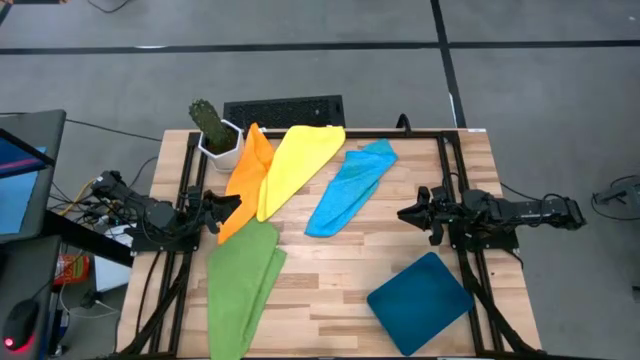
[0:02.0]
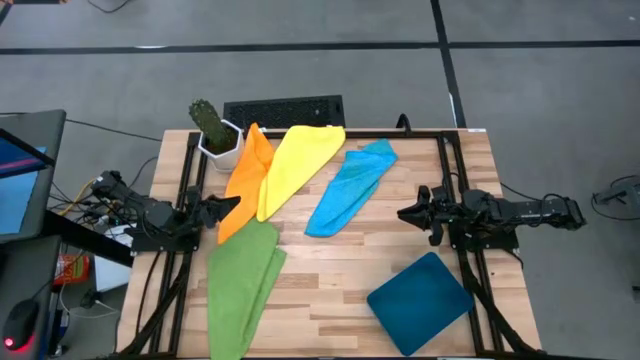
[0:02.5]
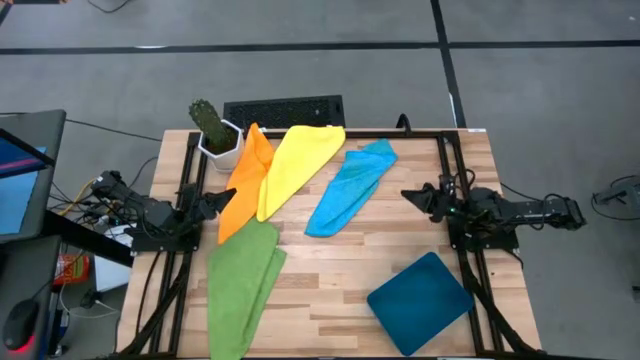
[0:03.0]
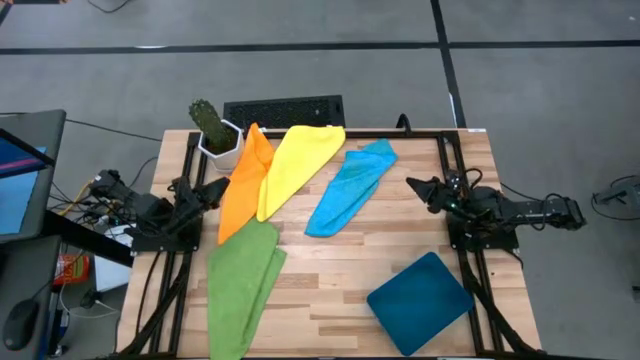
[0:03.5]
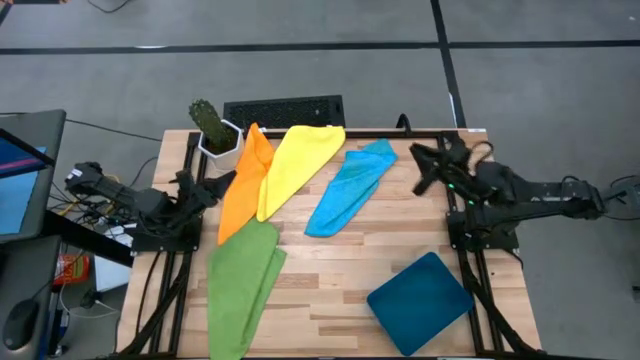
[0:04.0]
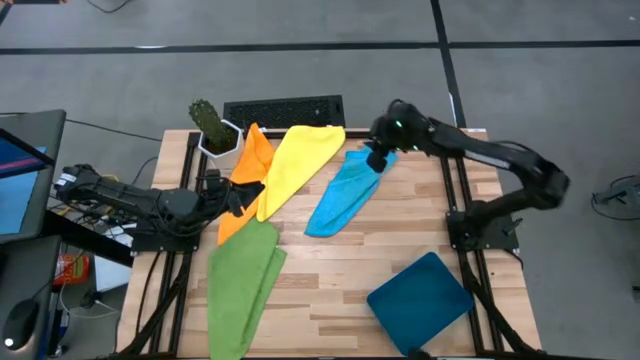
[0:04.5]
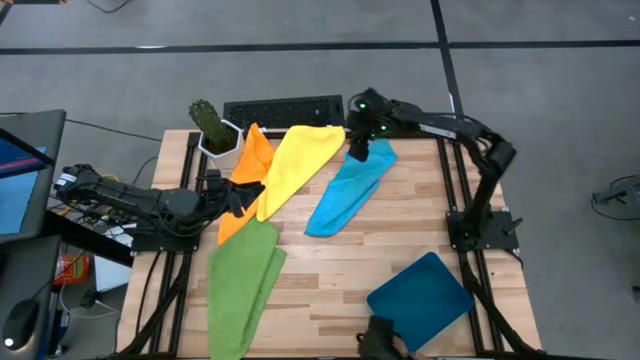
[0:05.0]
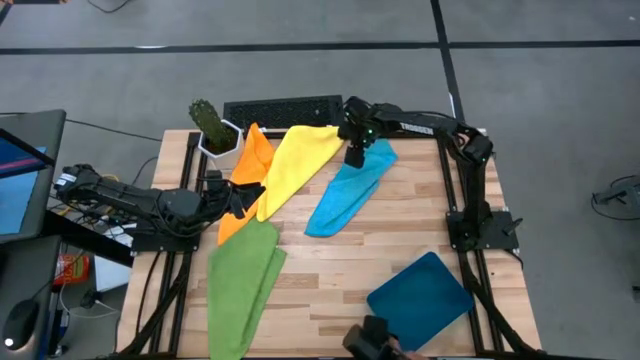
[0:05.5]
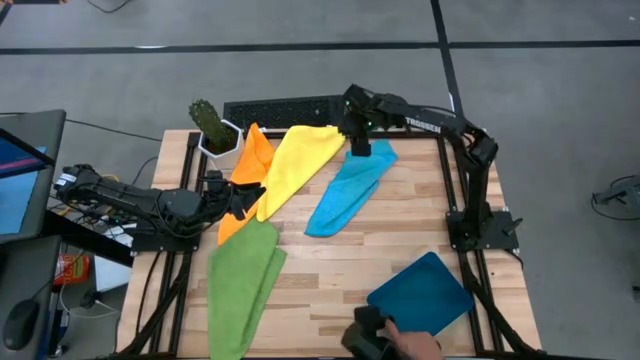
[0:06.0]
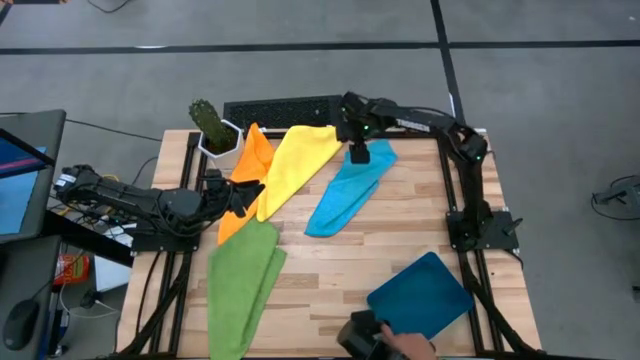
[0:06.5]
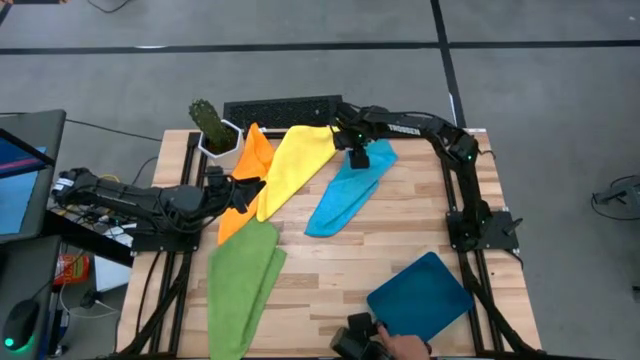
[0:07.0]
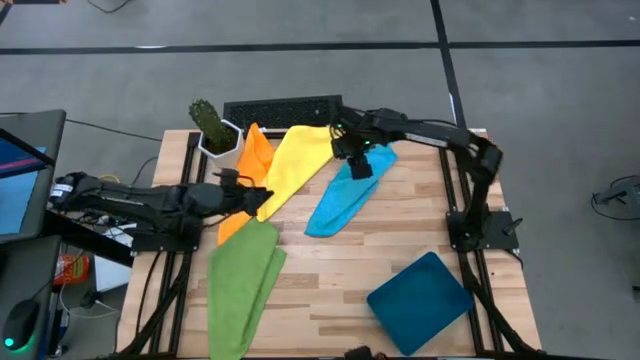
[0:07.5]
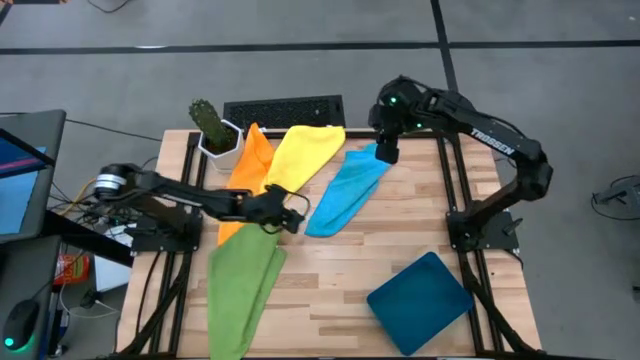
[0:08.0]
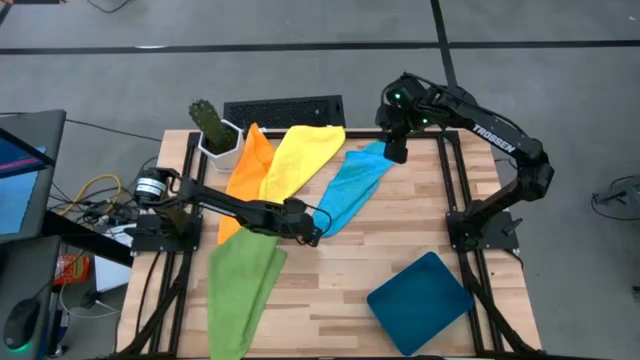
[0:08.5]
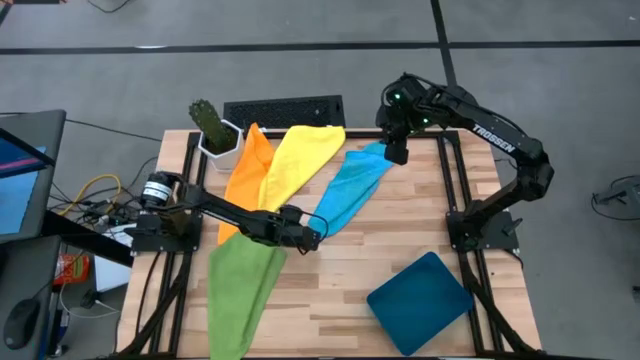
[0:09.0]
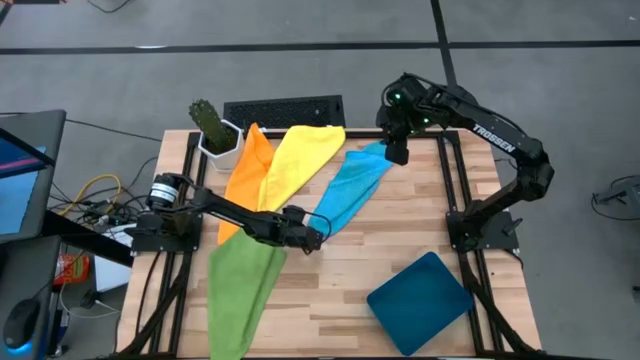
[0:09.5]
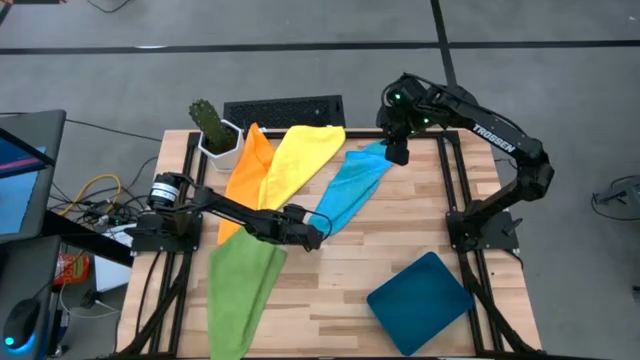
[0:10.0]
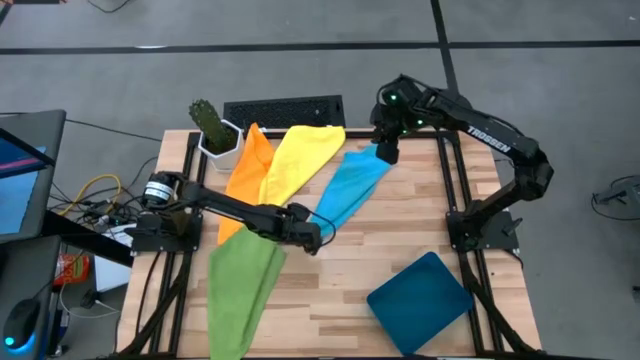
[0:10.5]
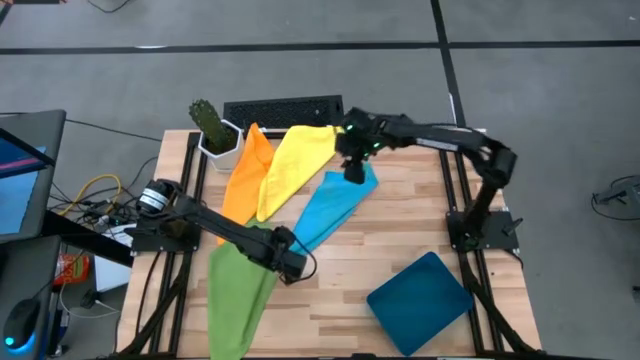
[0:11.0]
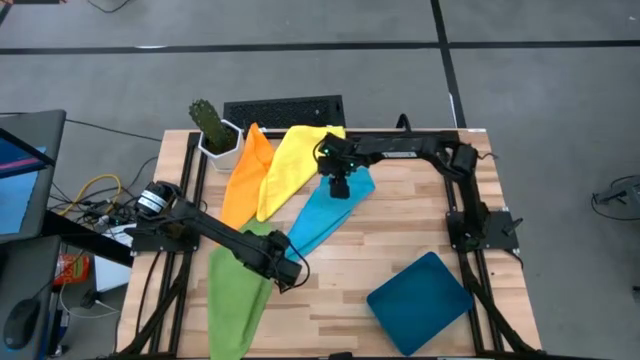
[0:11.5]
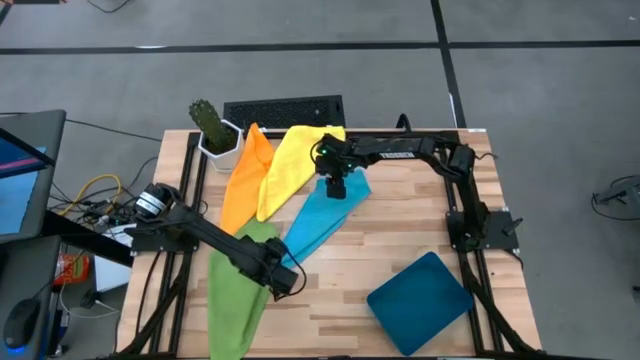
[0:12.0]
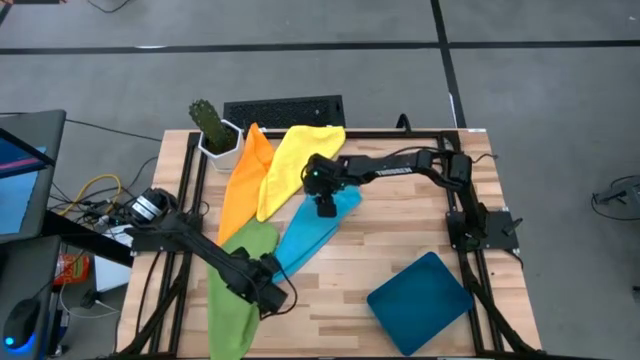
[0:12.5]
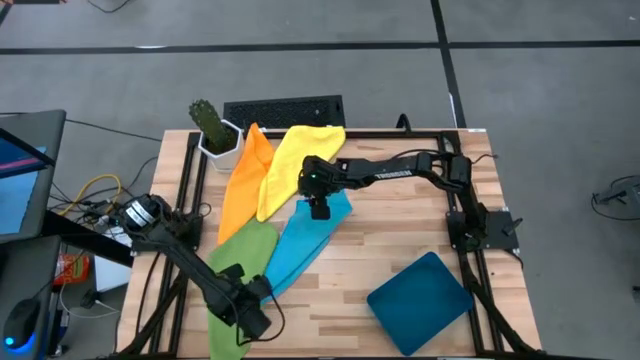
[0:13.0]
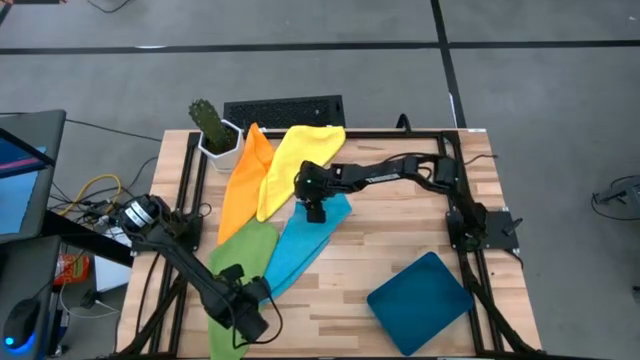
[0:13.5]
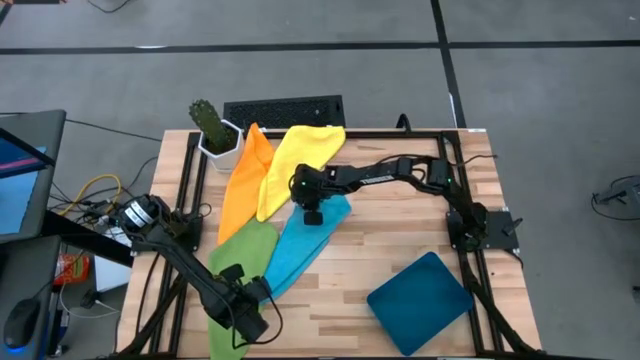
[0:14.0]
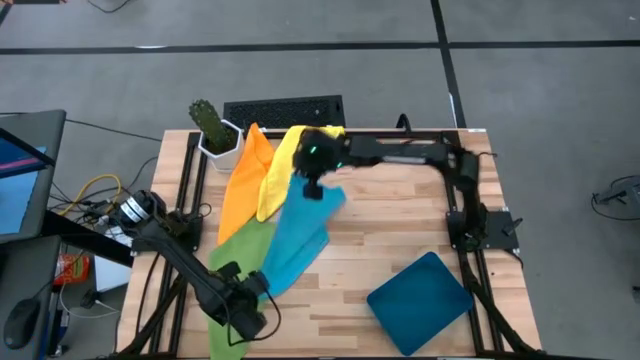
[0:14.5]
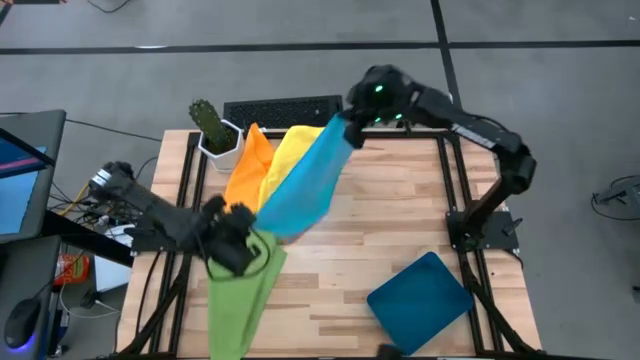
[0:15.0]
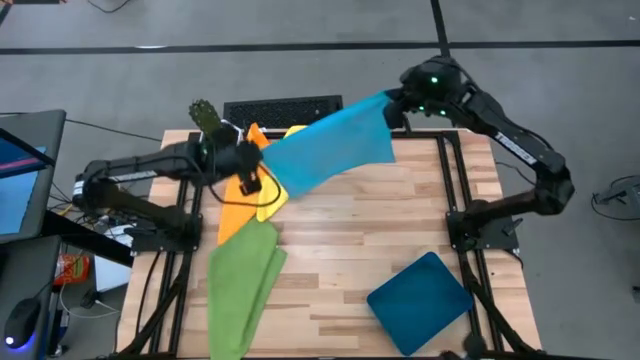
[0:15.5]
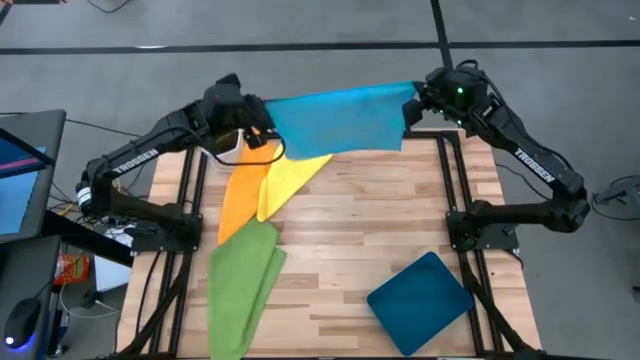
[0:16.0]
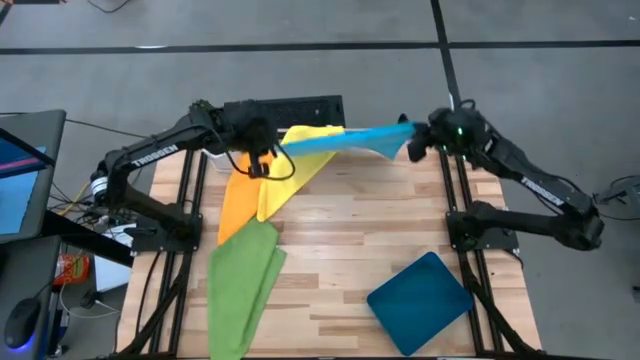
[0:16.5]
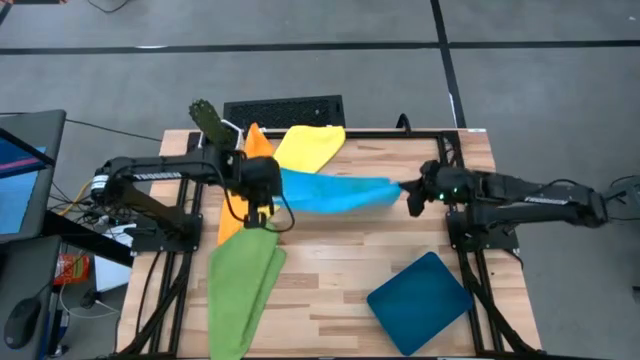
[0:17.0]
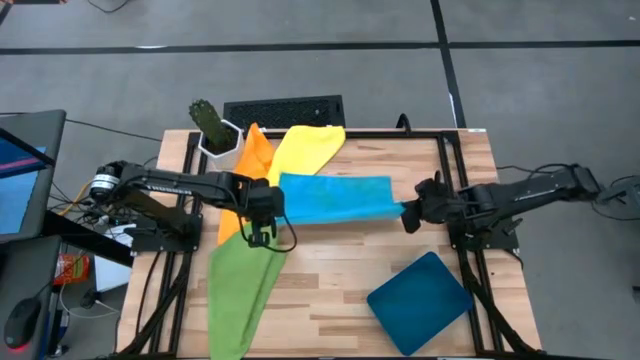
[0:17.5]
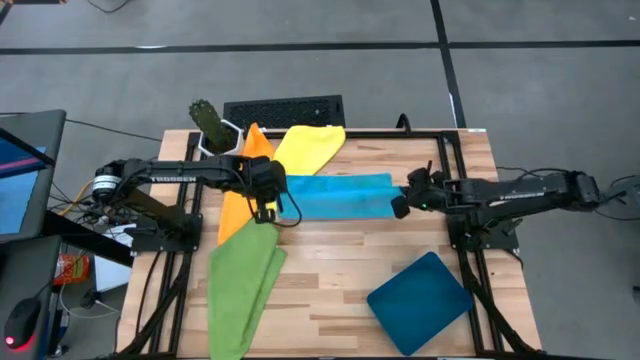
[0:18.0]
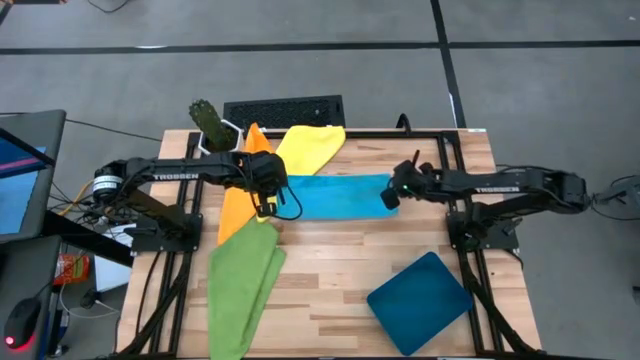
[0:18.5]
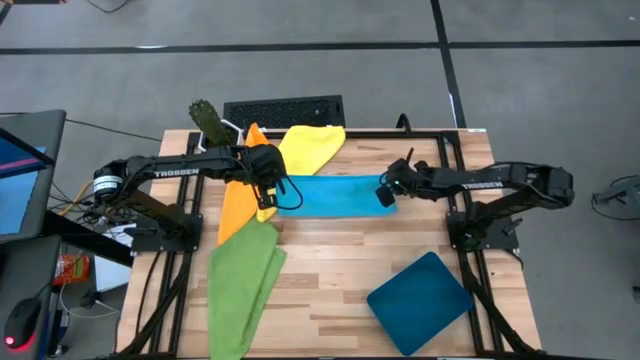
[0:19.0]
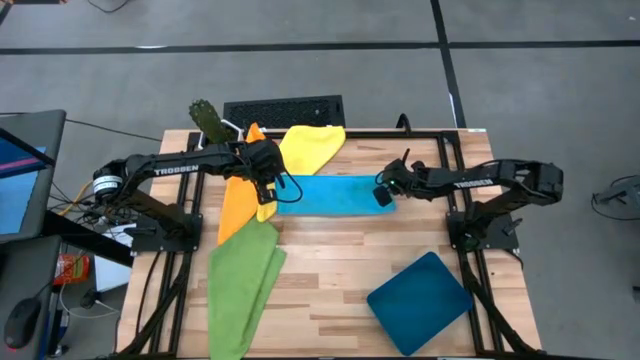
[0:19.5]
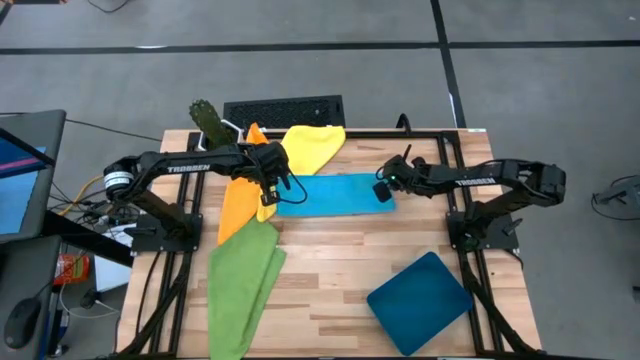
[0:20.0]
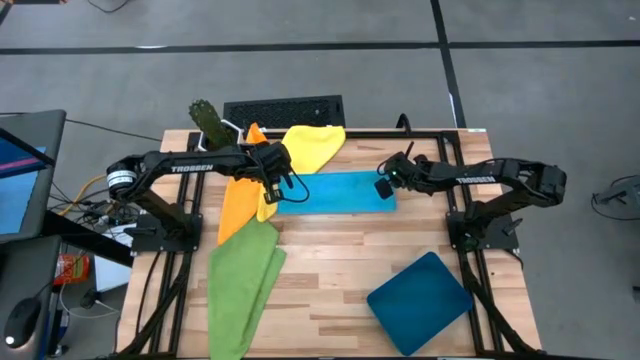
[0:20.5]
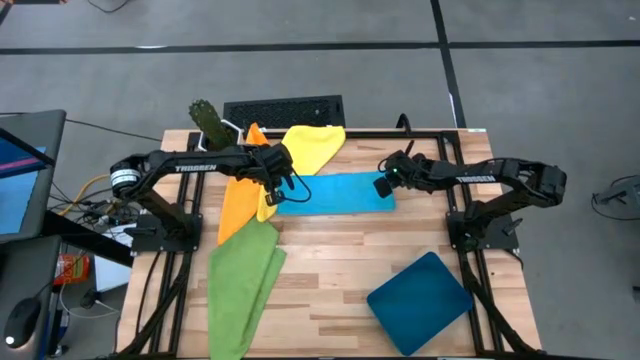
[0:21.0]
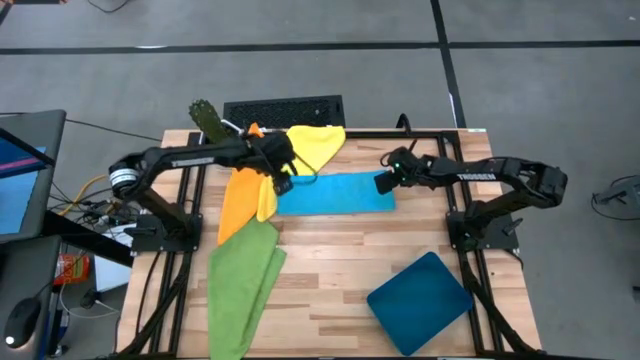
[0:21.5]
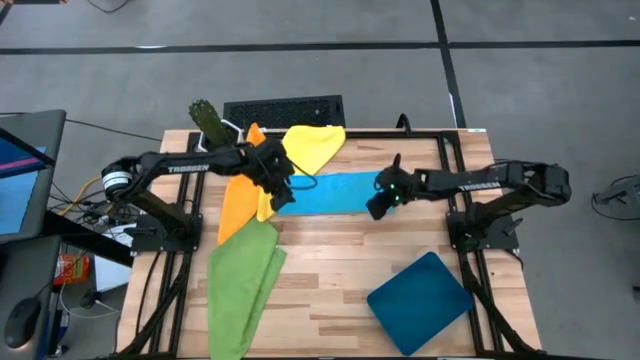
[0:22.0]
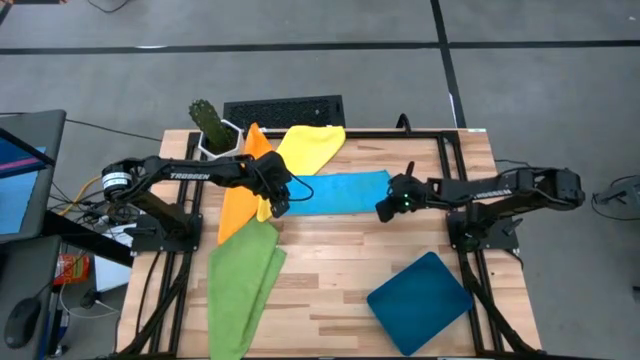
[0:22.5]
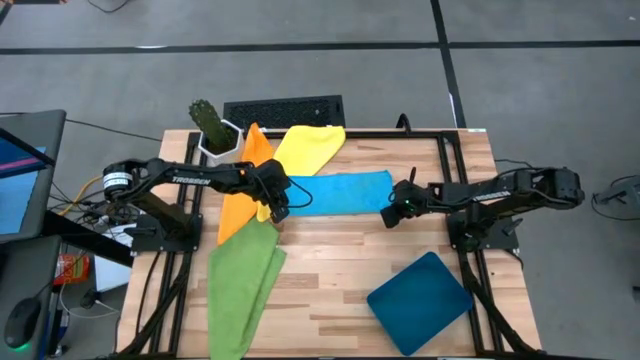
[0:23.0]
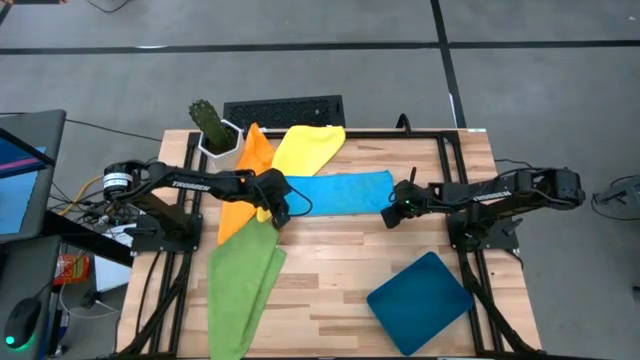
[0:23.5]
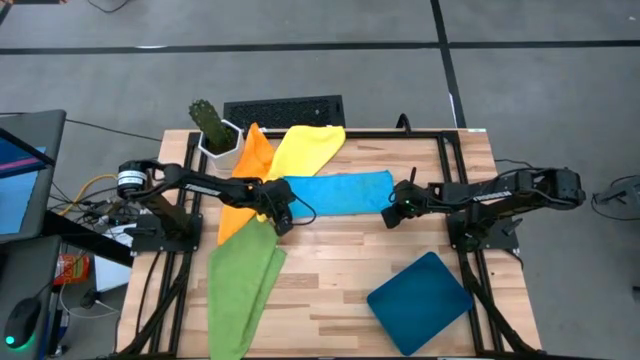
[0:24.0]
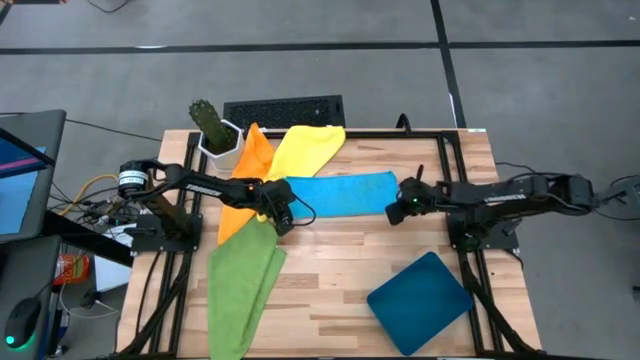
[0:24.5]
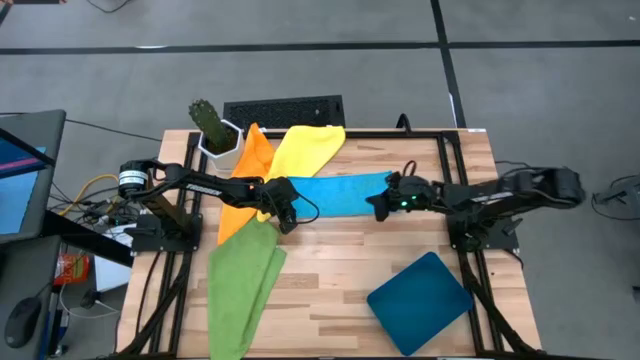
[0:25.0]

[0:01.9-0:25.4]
Task: Fold microfiber towels
Fold the blue microfiber towel
